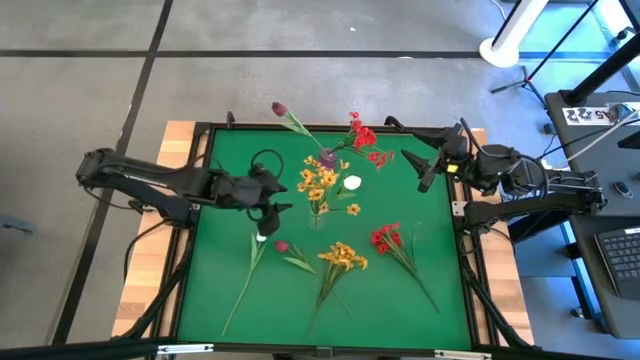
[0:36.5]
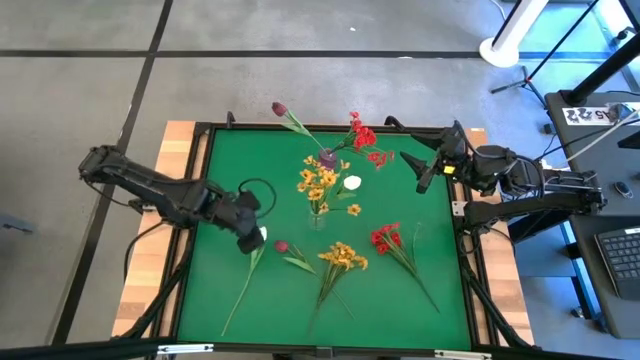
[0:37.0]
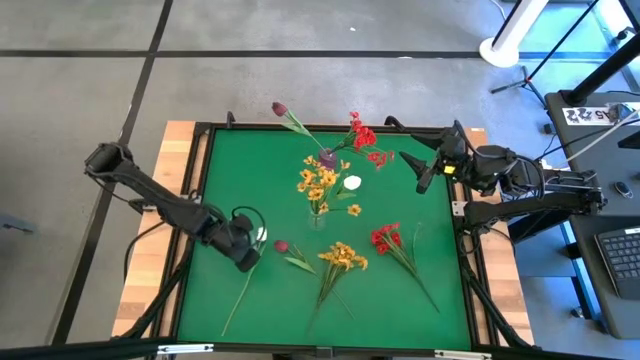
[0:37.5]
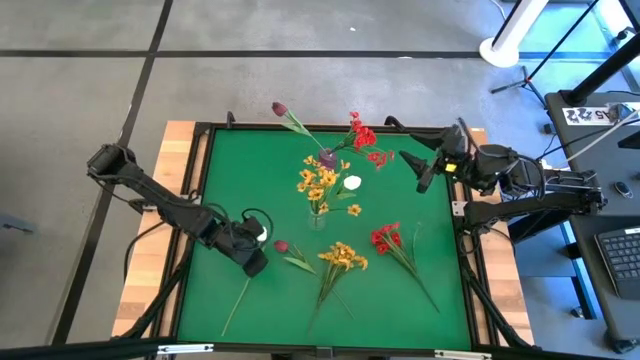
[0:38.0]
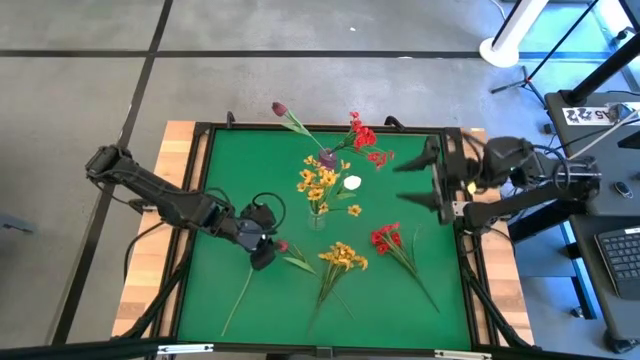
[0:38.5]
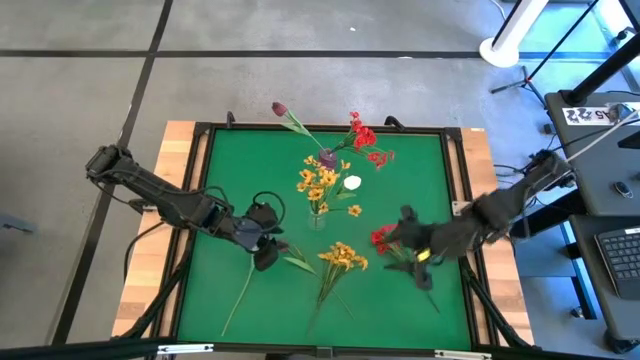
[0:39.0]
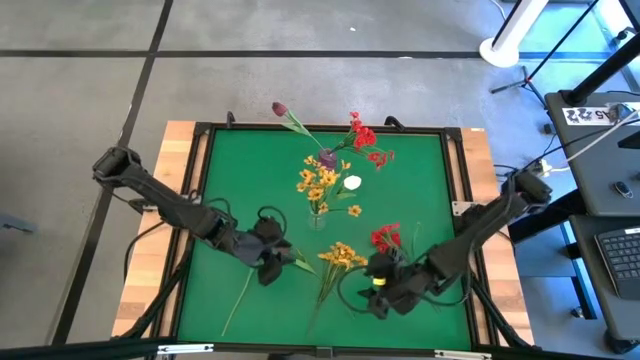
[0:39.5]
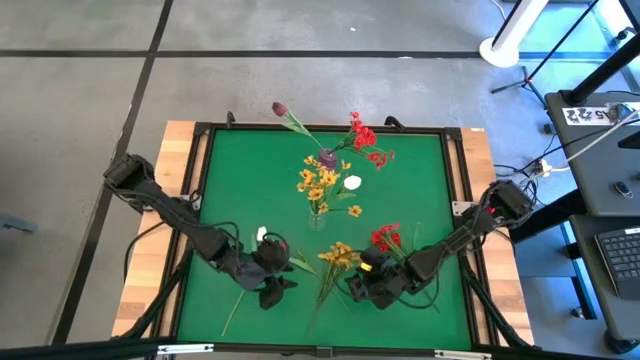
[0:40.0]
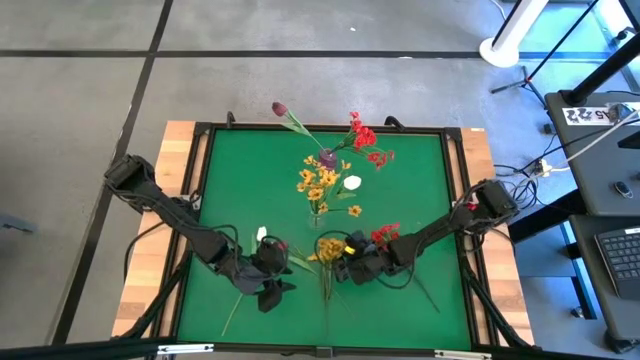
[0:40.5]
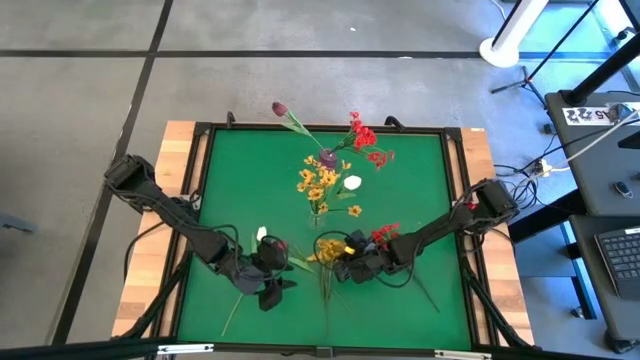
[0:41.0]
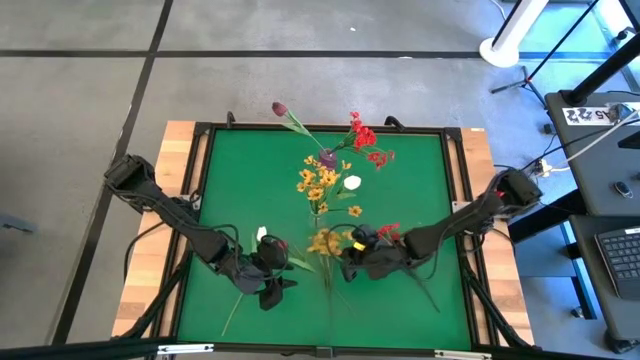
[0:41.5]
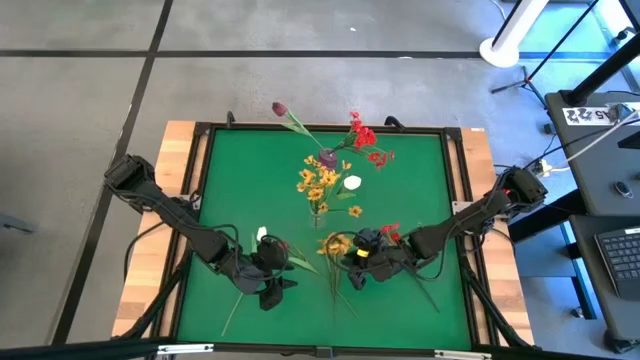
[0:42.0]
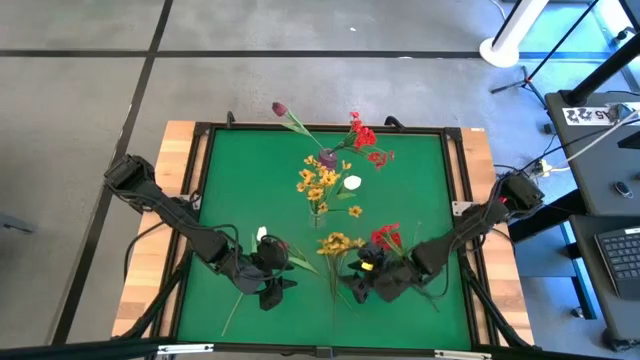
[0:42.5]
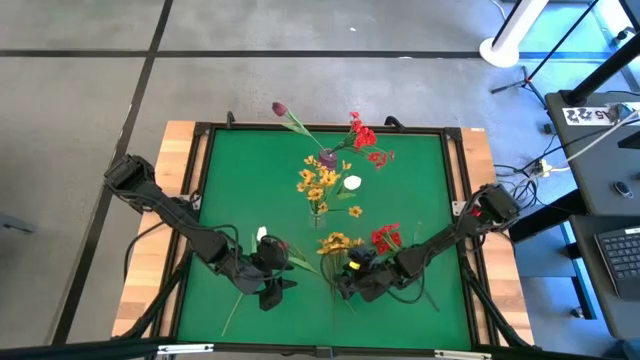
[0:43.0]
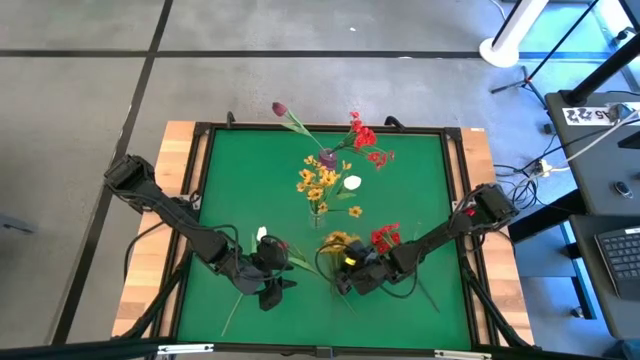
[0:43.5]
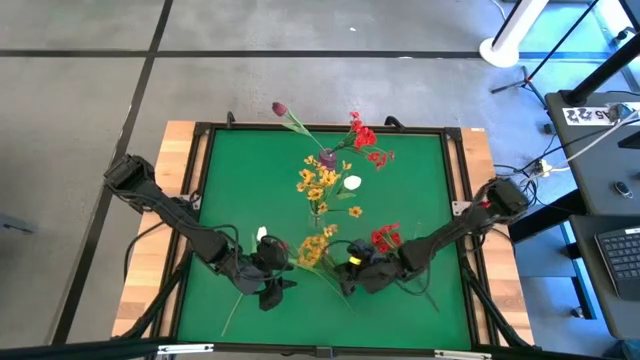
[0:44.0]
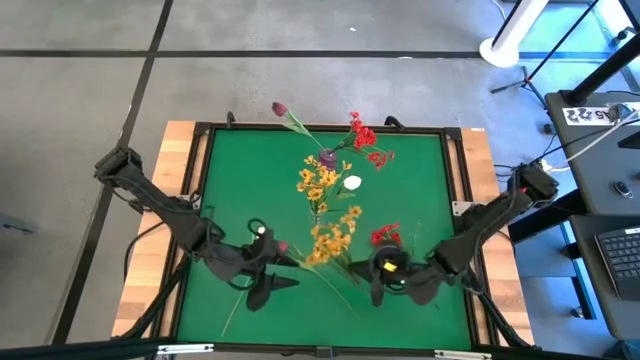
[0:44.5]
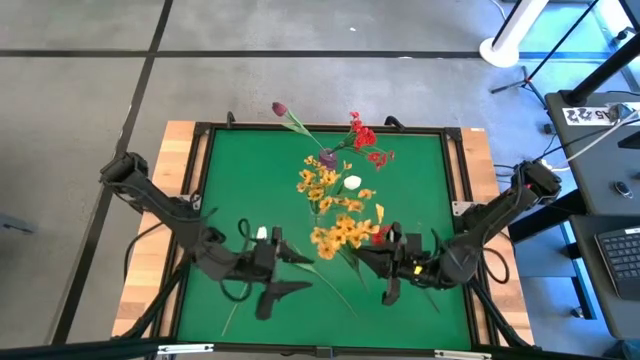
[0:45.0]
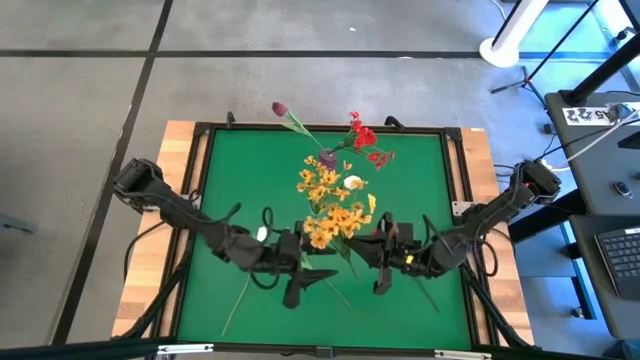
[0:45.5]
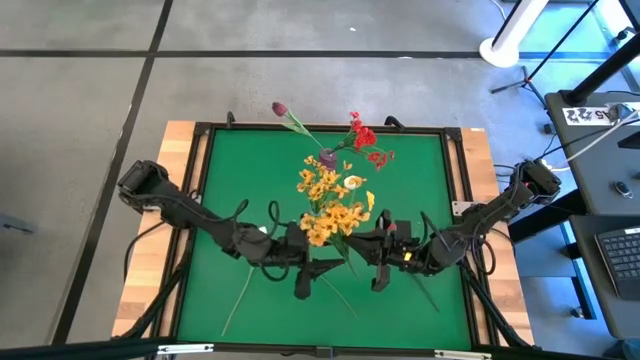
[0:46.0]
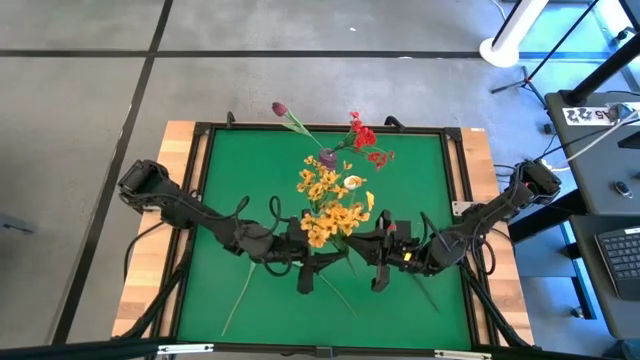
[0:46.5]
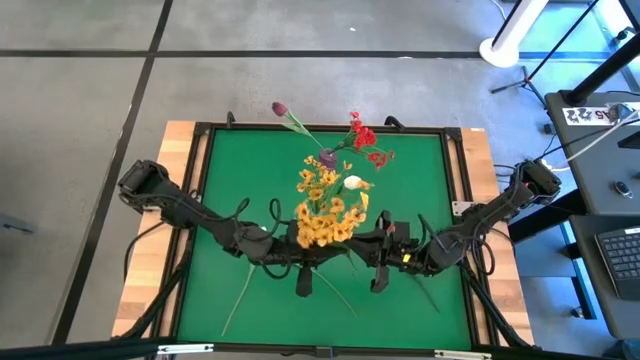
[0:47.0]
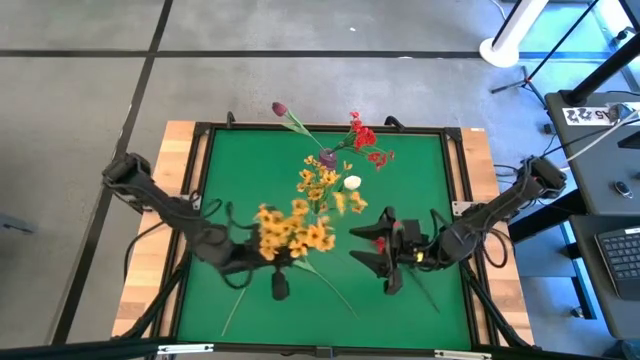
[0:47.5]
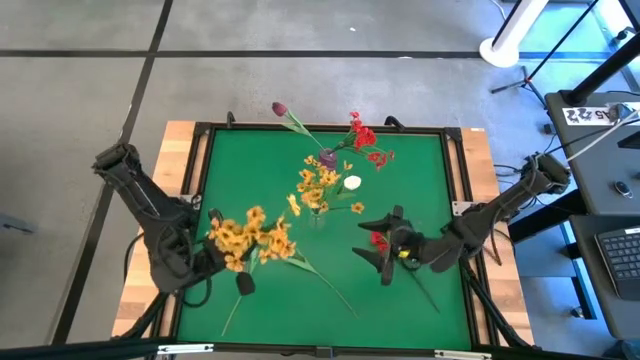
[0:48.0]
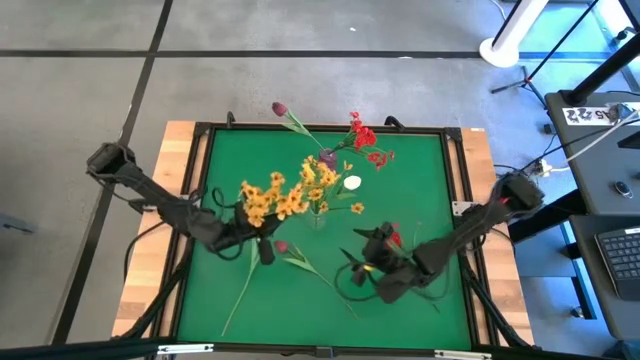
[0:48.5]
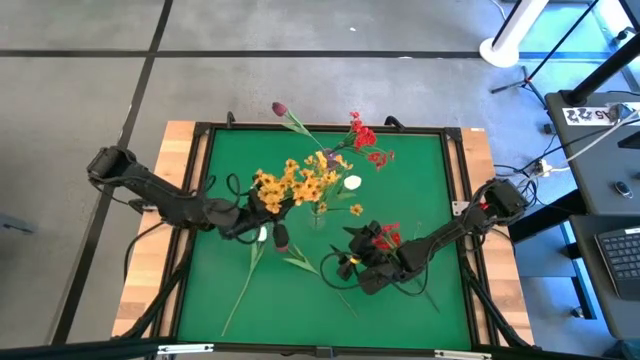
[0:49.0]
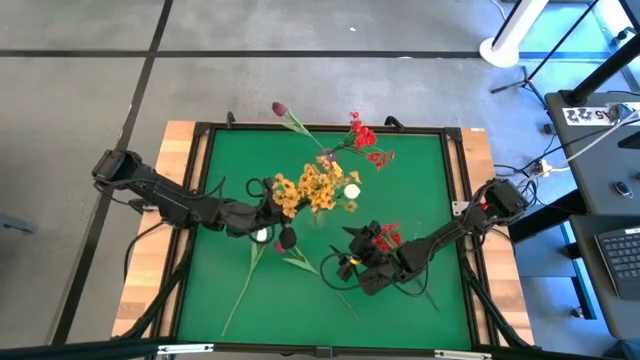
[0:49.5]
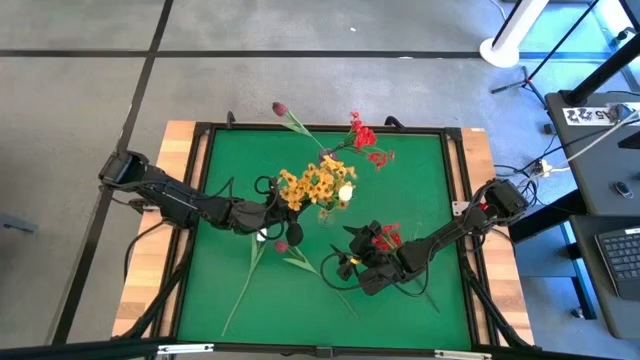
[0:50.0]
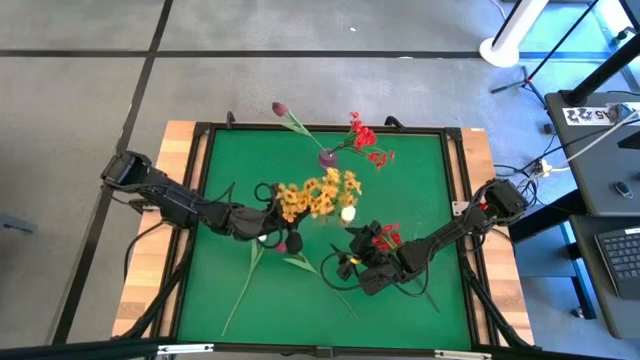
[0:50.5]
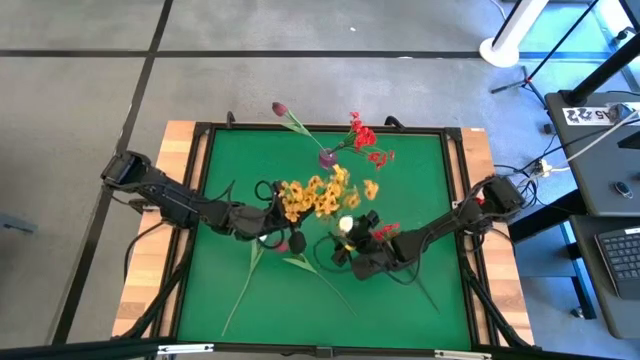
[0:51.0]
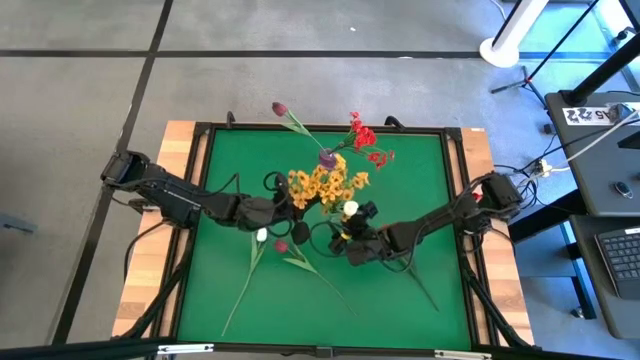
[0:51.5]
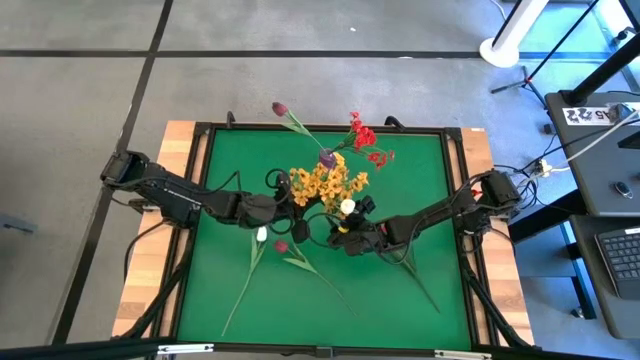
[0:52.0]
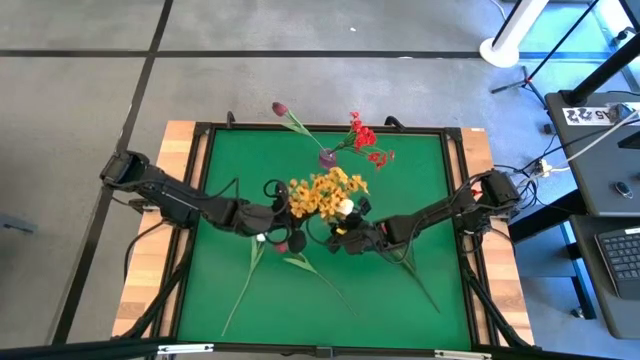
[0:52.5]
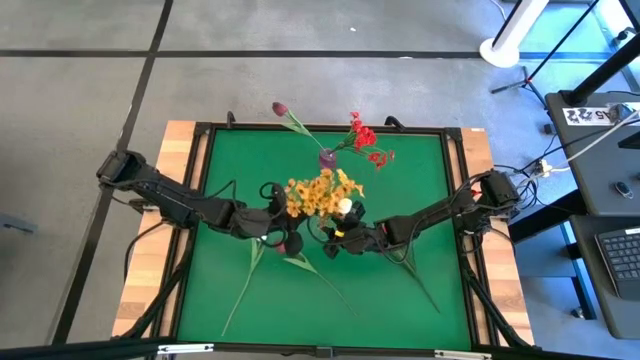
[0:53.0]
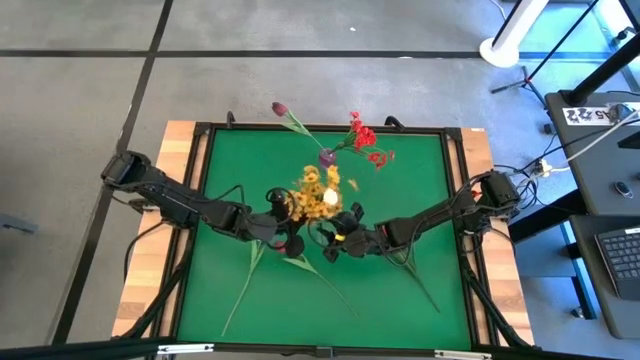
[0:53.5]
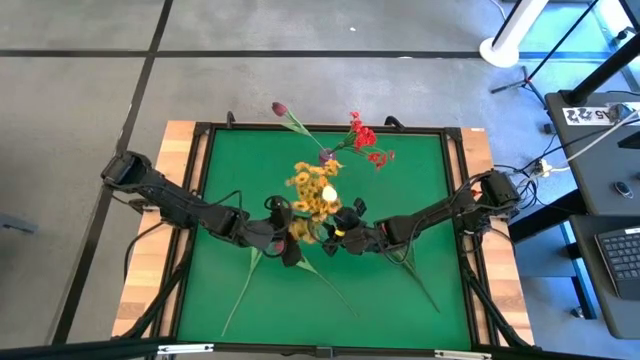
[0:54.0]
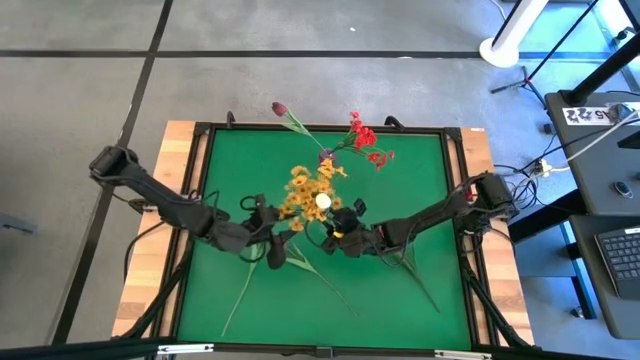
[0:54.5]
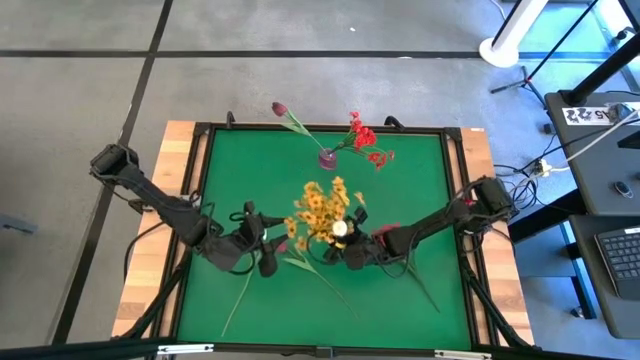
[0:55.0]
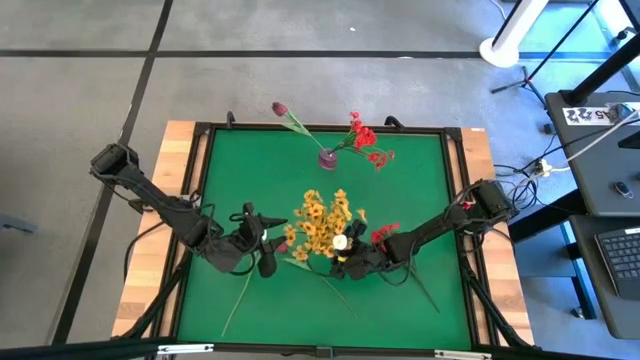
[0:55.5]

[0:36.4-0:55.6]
Task: Sort flowers into vase by color
Put the yellow flowers into the transparent vase

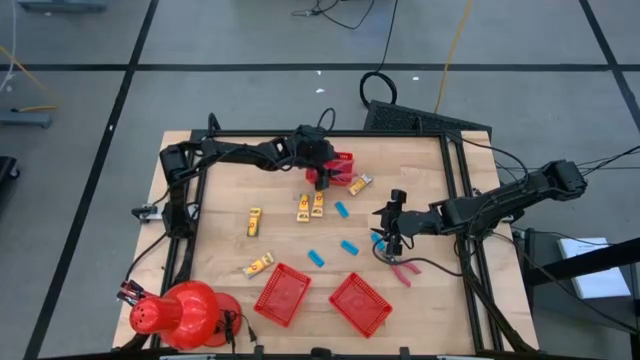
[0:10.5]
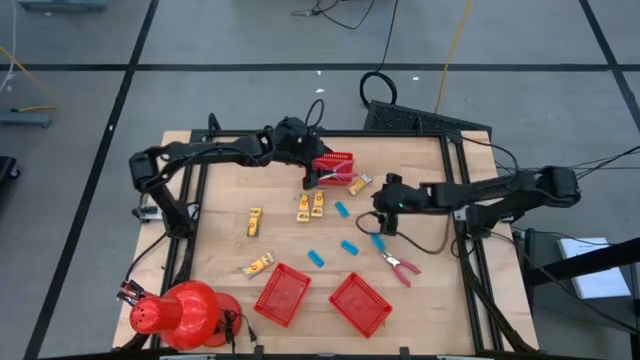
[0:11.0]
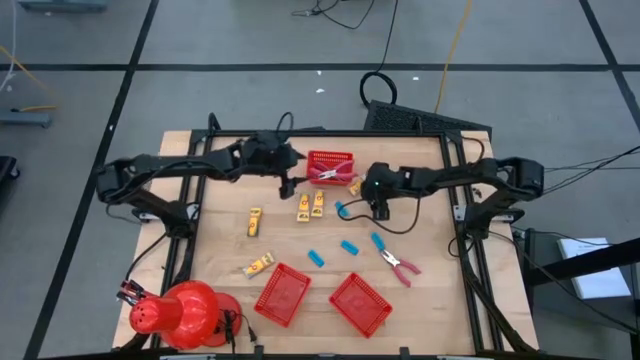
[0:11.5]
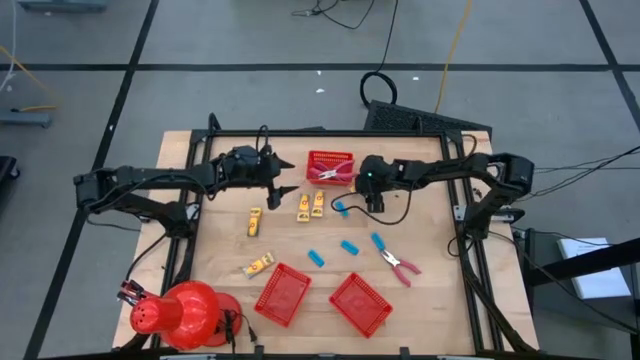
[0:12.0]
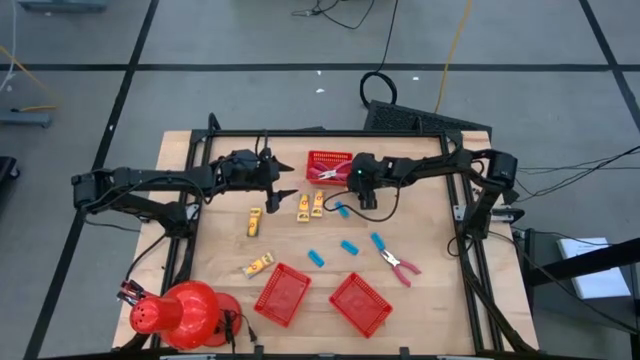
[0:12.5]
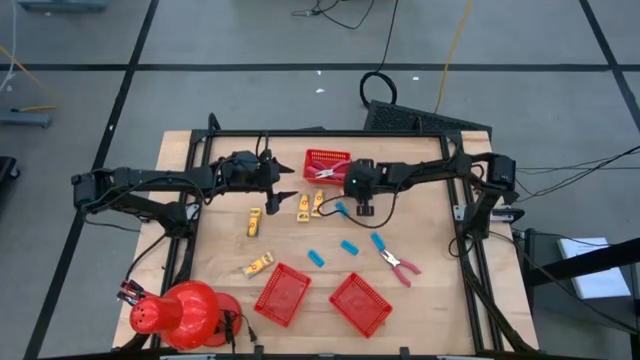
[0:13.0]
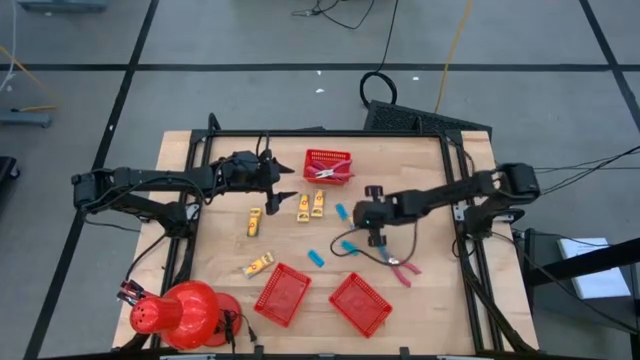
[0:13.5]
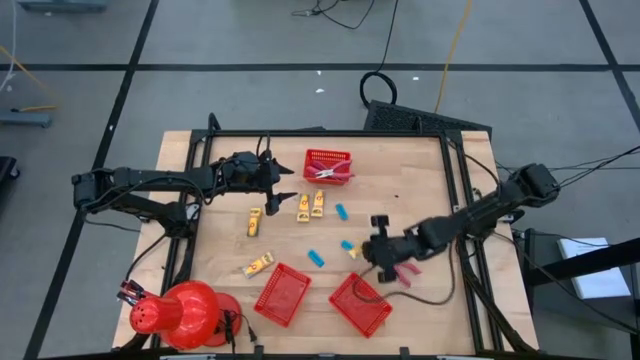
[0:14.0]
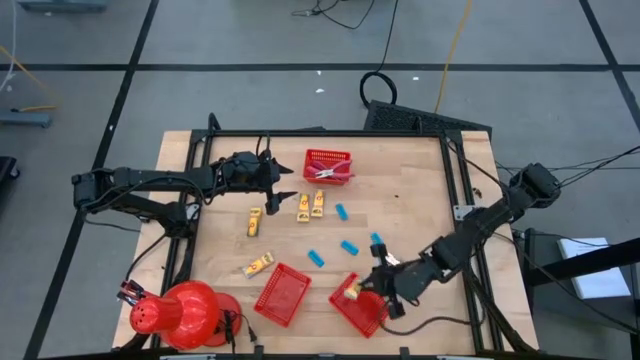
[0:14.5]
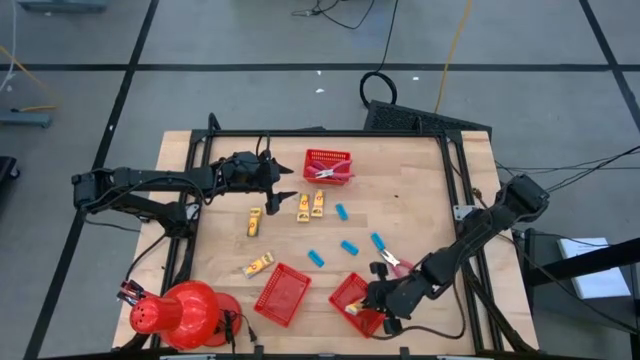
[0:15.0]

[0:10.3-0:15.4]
Task: Pick & Place School Supplies
Put the yellow crayon pack into the bottom right red basket
